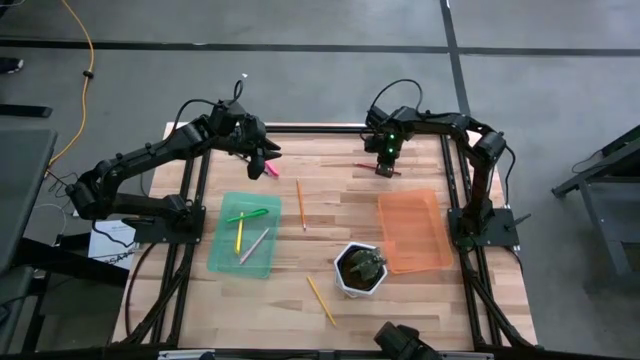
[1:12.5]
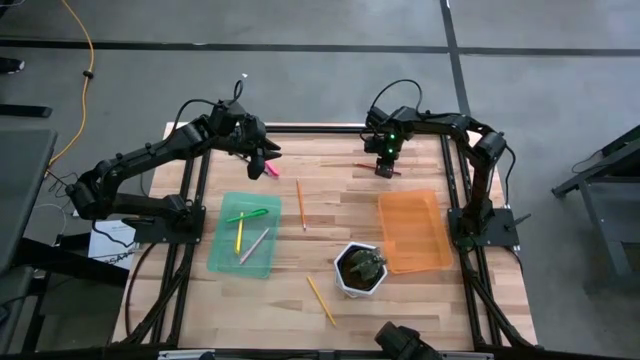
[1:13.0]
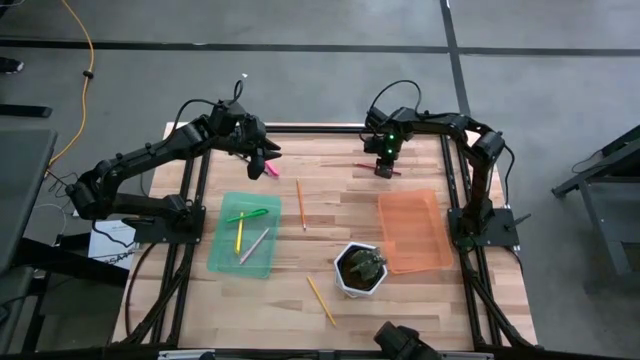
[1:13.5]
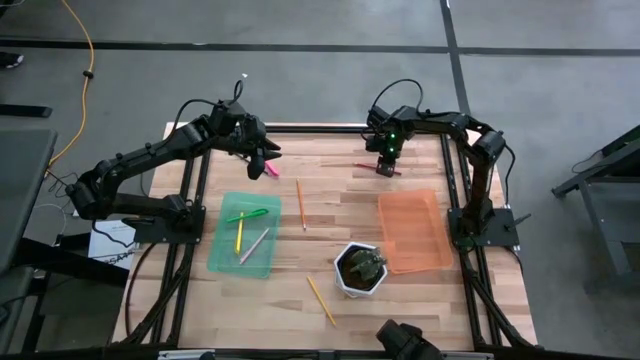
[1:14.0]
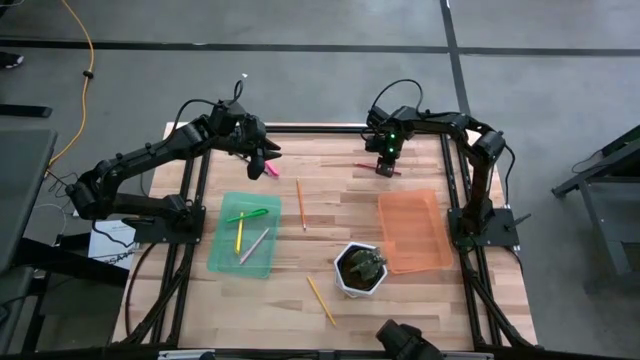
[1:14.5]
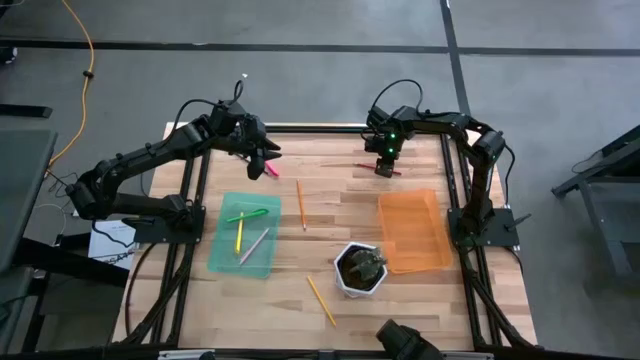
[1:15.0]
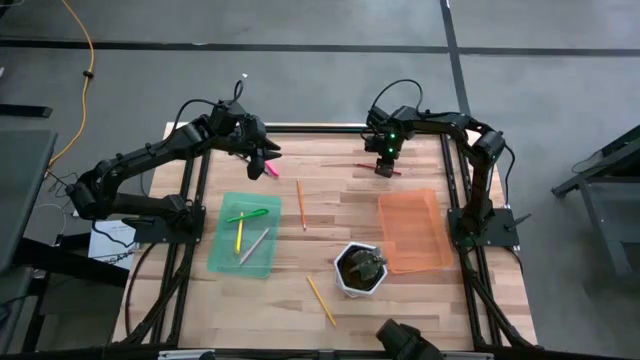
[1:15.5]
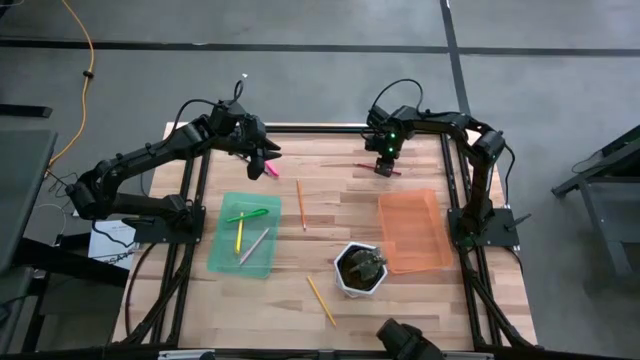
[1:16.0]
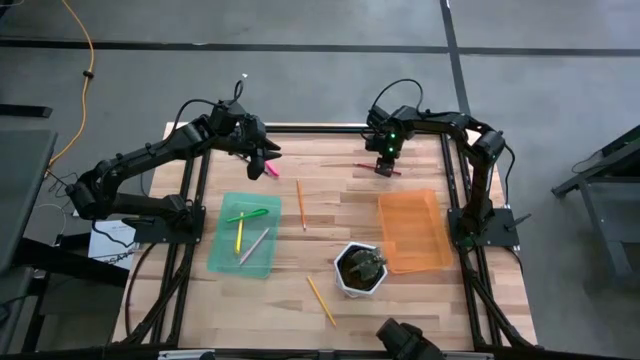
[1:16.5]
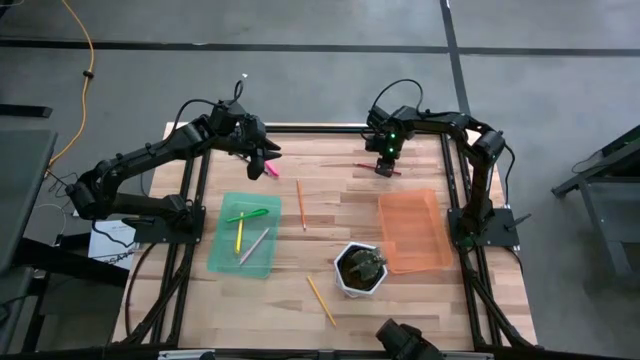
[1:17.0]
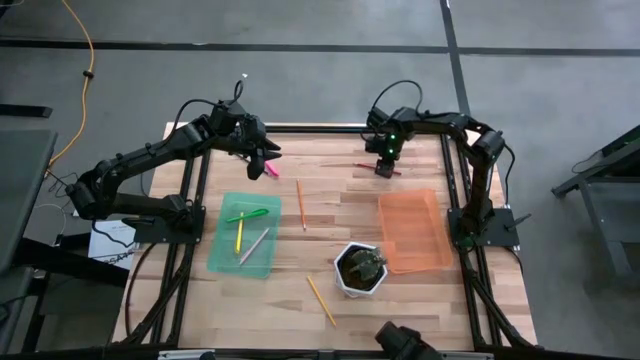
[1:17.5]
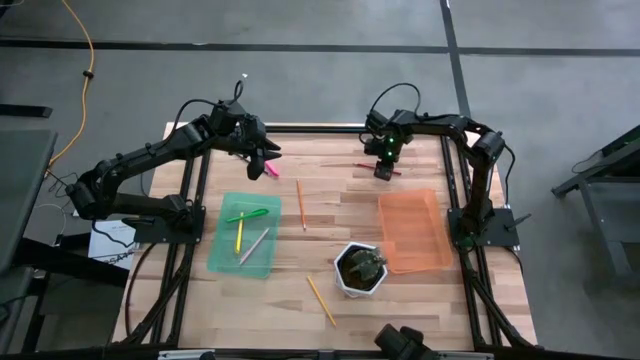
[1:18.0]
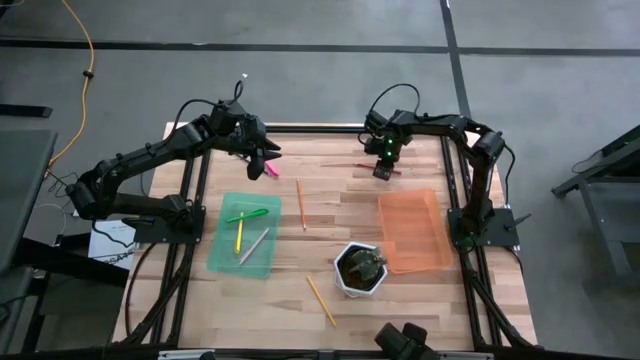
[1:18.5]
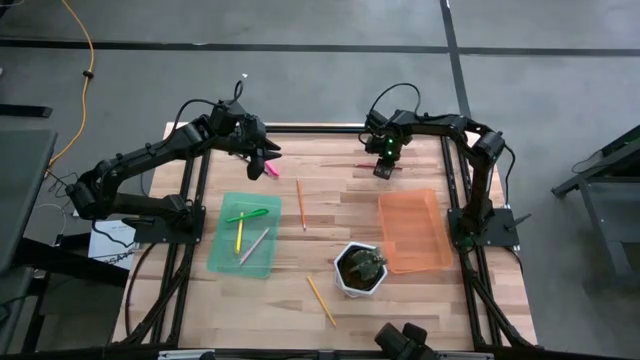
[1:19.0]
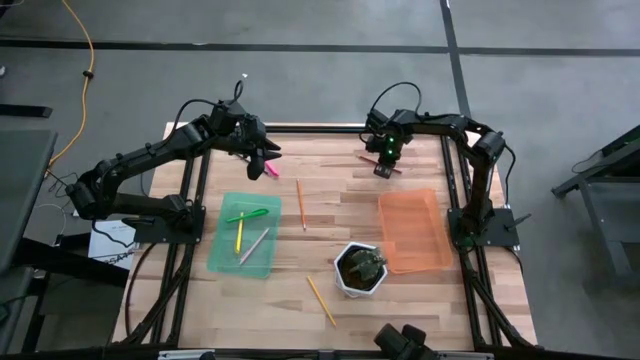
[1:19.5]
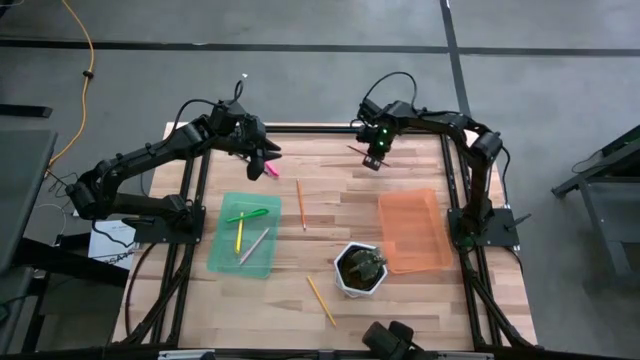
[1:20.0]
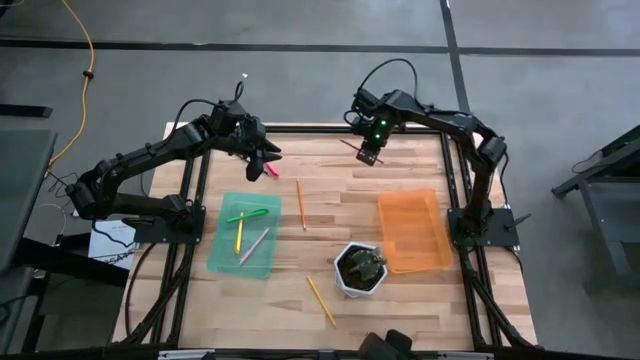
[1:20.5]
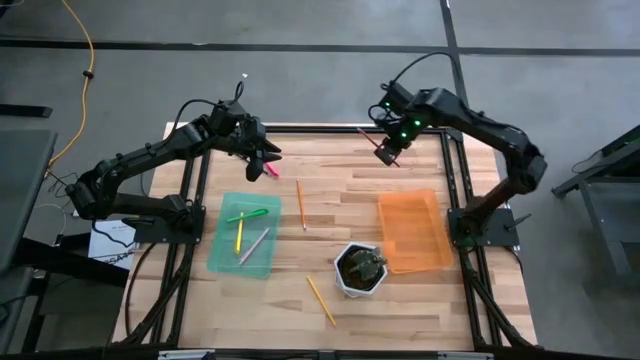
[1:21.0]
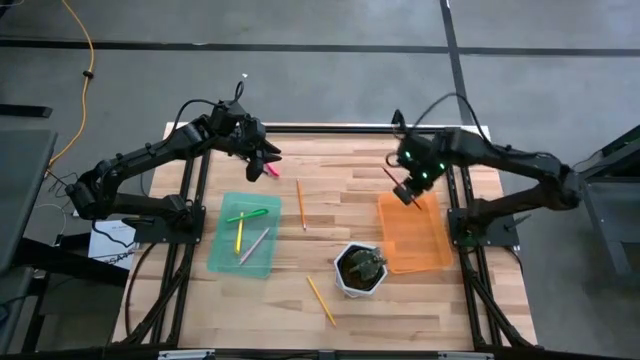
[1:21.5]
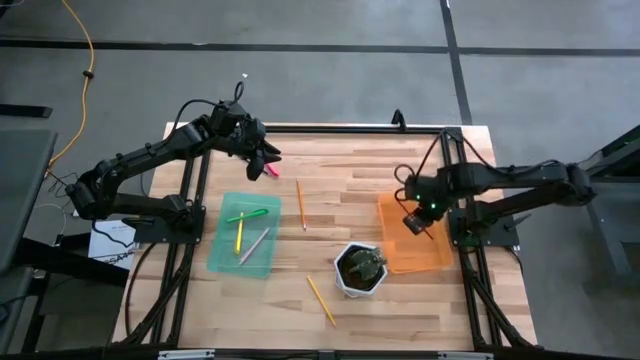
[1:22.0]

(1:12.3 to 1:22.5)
Task: Sort pens & pencils
Put the red pencil into the orange bin

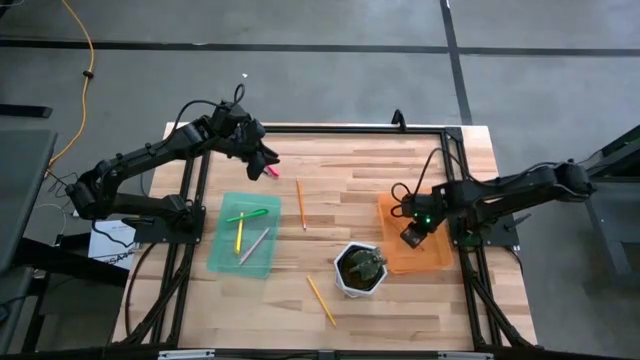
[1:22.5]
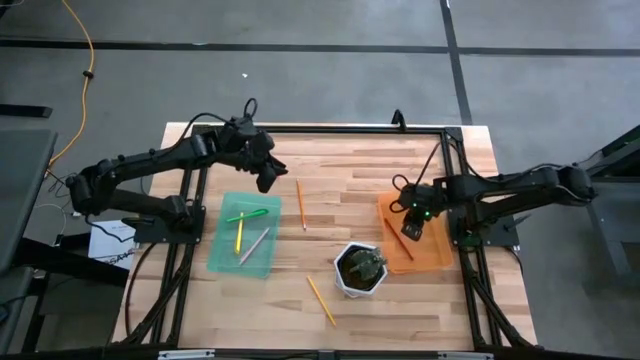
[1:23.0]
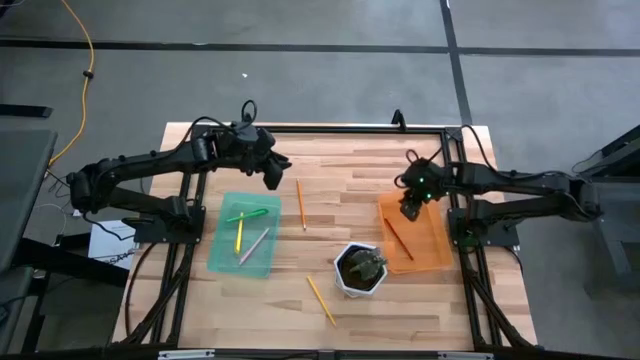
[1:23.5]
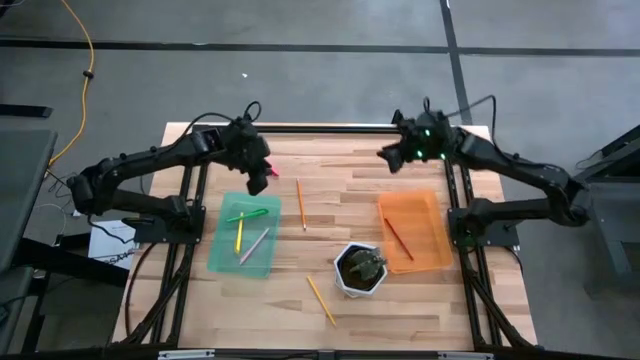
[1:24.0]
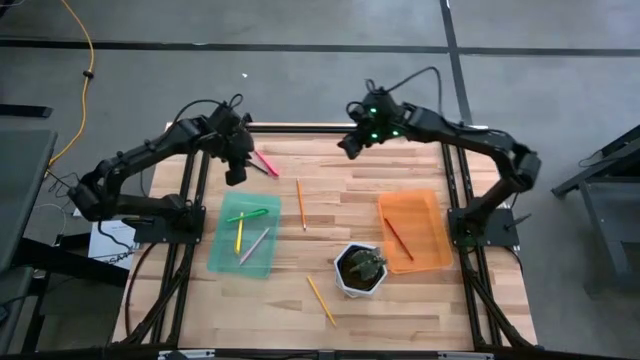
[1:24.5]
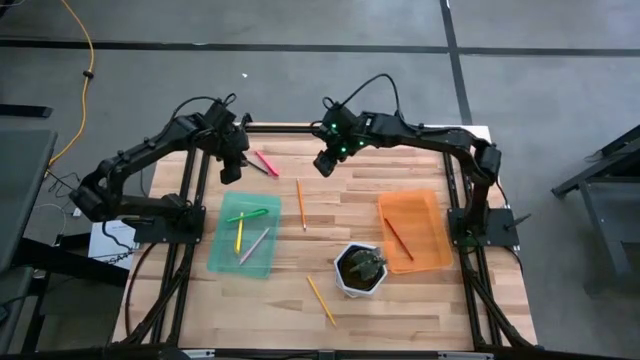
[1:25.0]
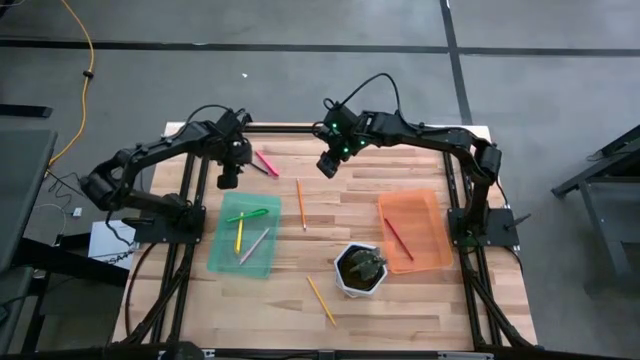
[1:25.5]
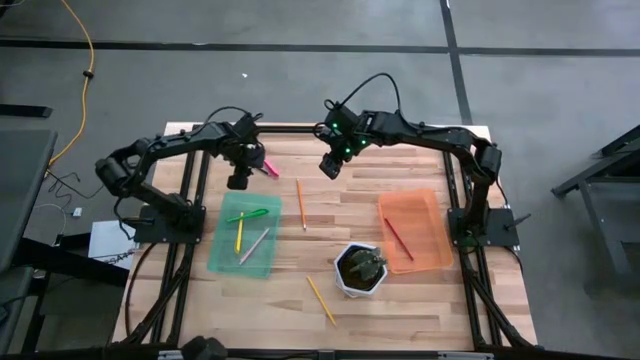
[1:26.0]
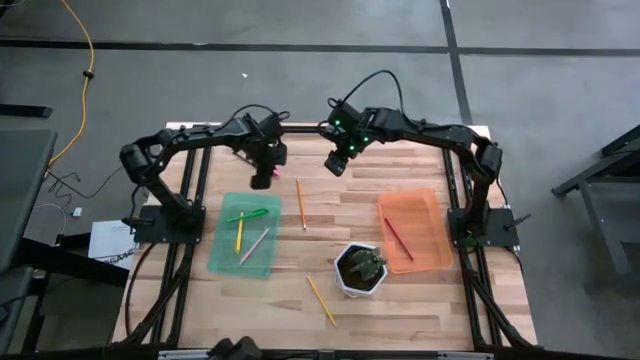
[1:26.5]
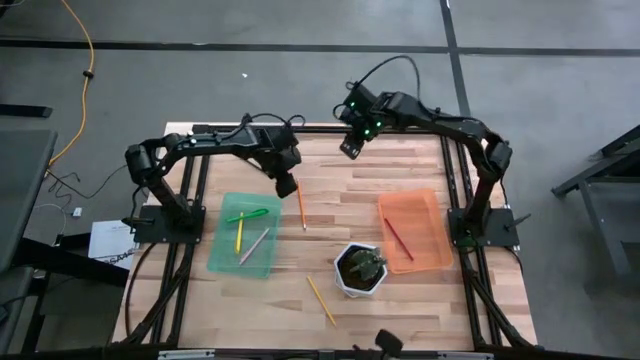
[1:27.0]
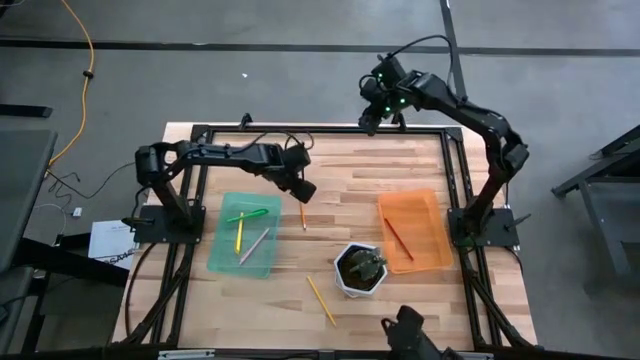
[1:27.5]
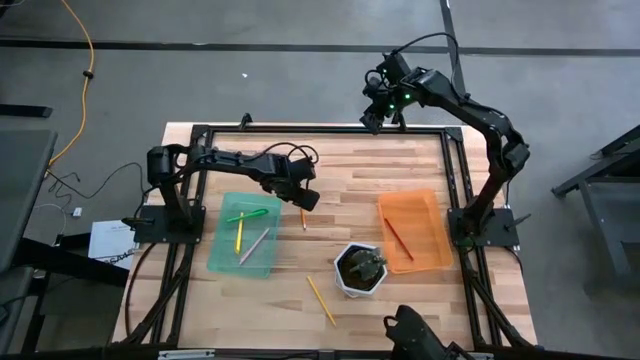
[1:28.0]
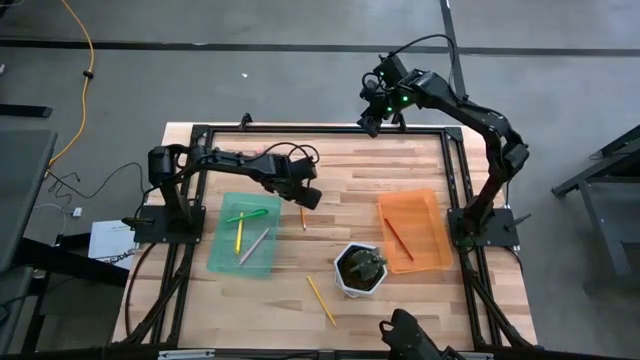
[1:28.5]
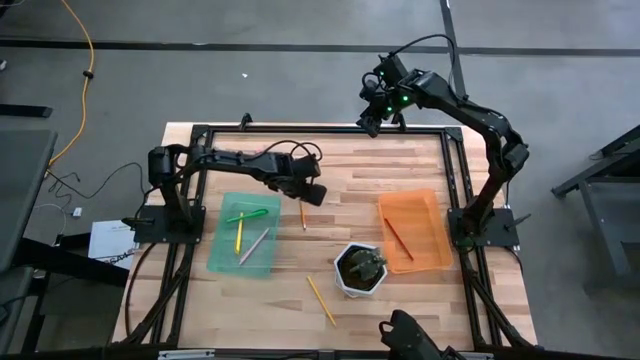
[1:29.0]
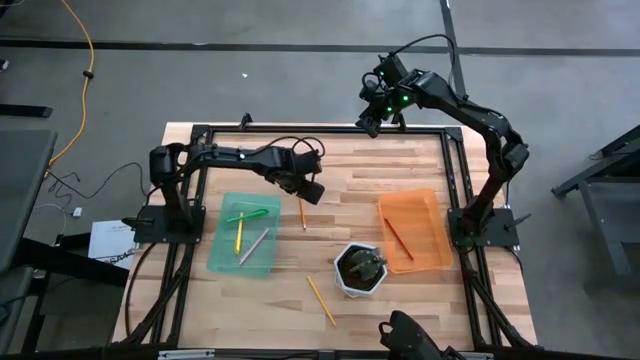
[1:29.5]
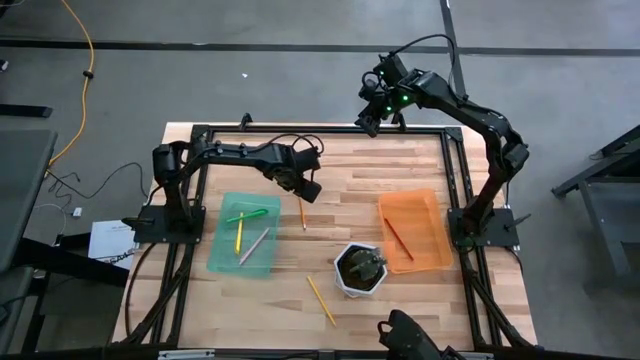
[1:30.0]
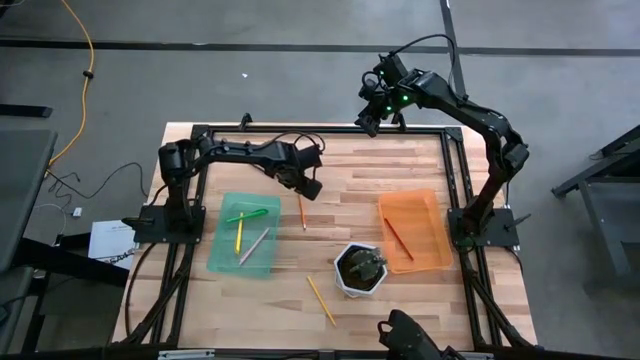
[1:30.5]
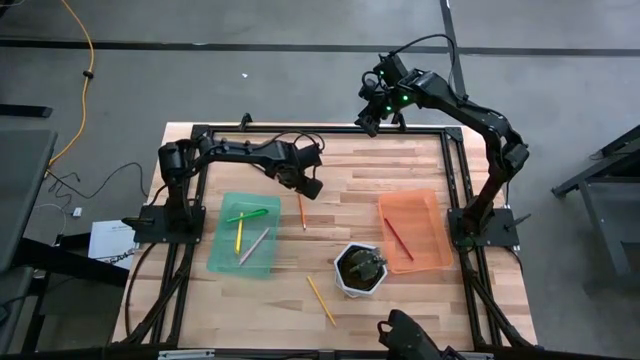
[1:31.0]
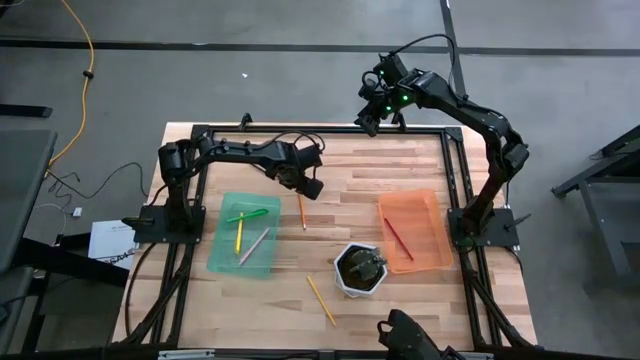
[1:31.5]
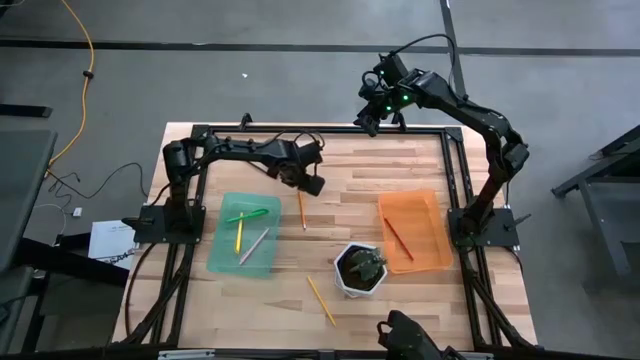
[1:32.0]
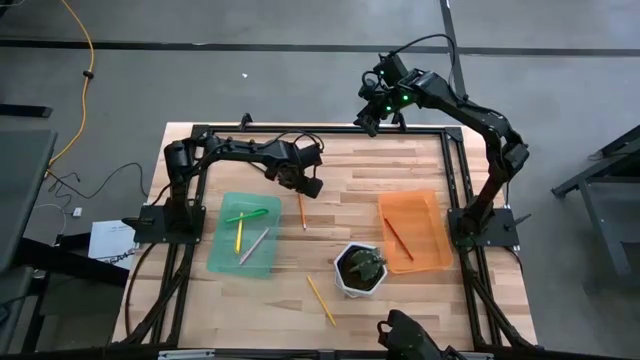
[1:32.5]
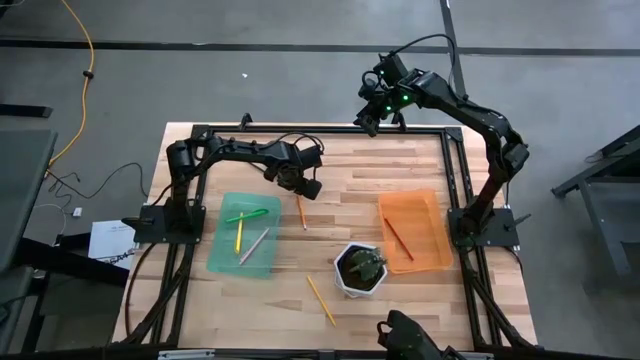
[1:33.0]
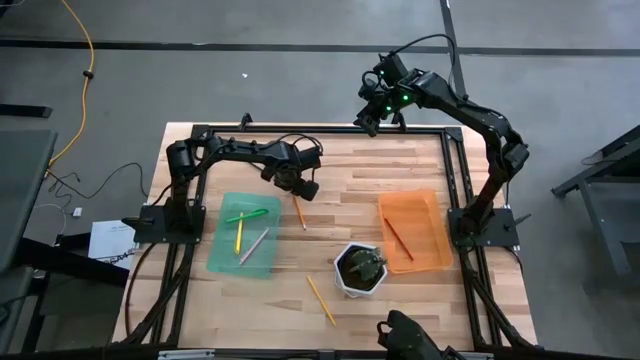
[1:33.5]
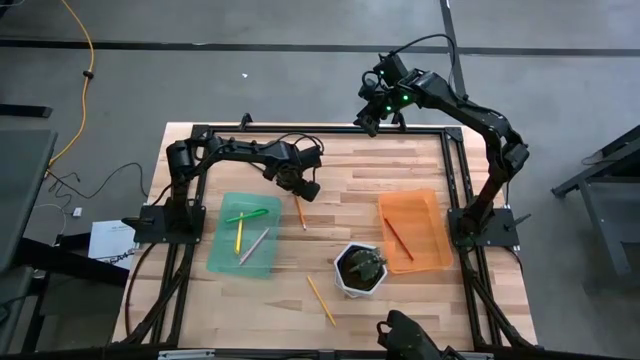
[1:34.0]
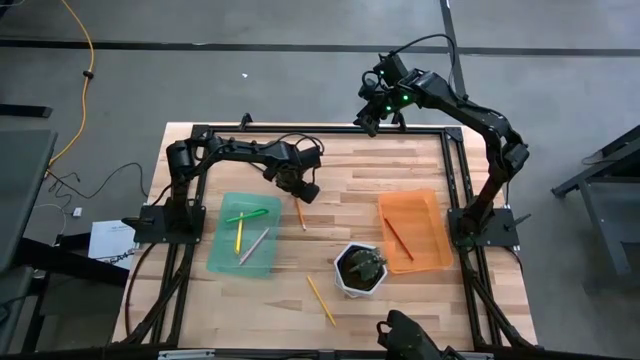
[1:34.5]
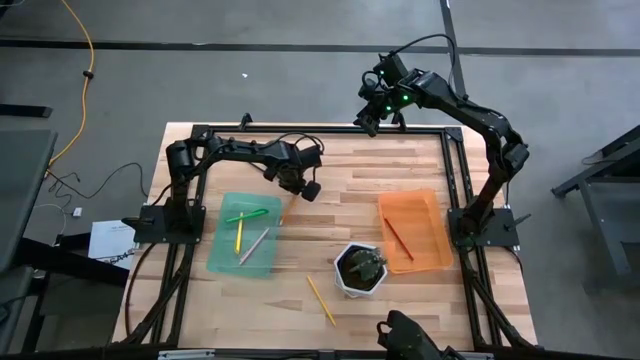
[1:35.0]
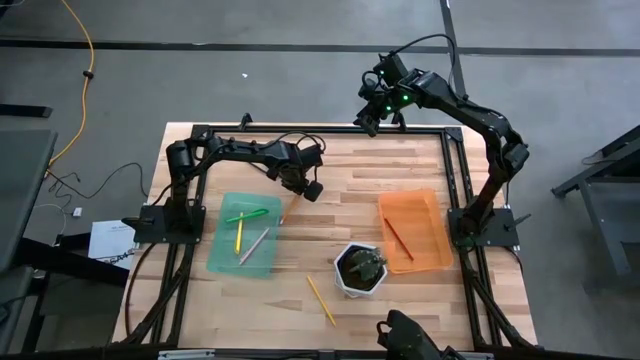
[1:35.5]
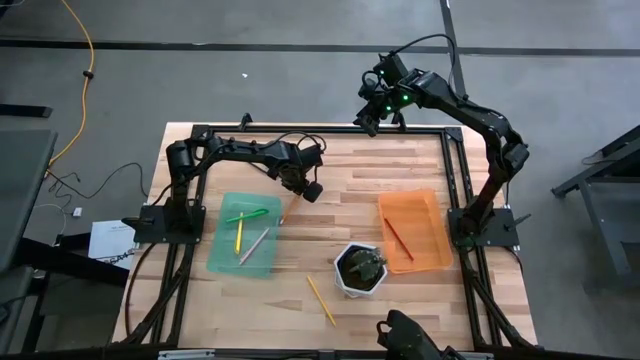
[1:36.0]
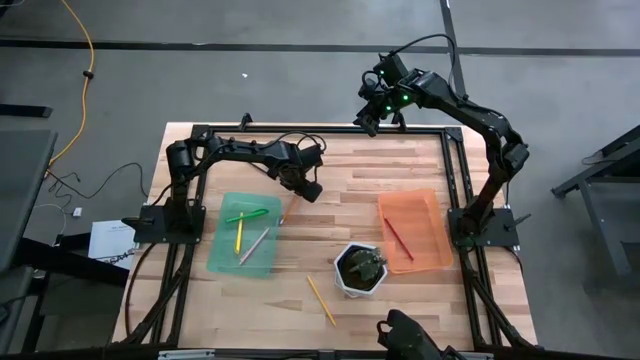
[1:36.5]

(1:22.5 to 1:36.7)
Put the orange pencil into the orange bin
